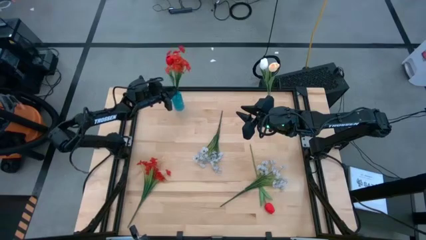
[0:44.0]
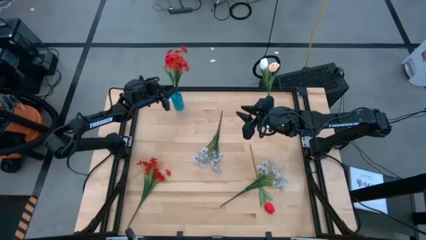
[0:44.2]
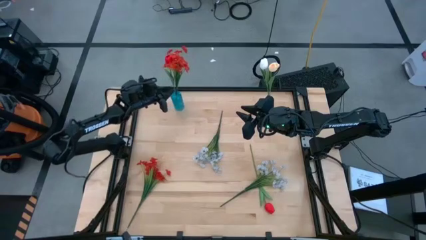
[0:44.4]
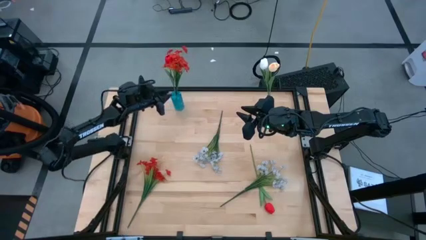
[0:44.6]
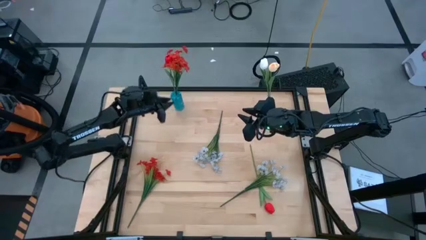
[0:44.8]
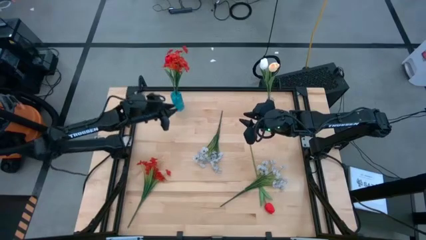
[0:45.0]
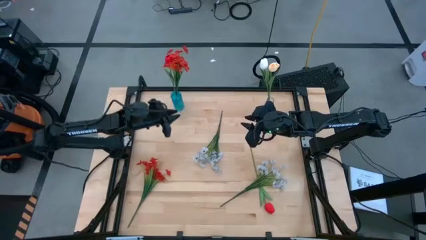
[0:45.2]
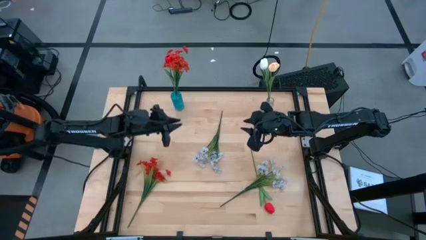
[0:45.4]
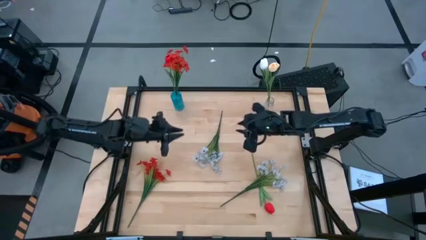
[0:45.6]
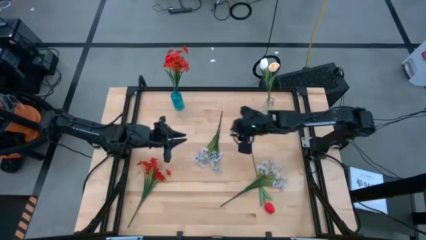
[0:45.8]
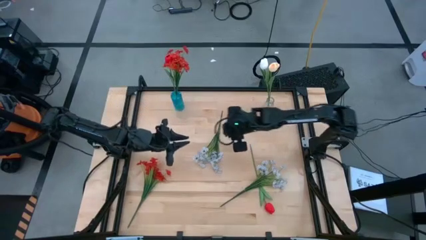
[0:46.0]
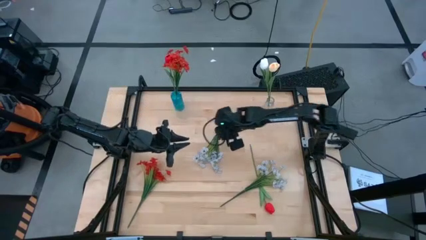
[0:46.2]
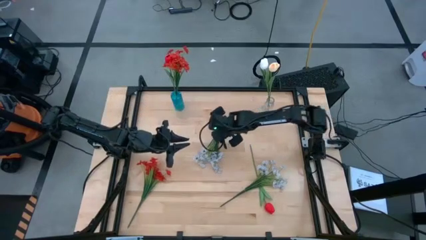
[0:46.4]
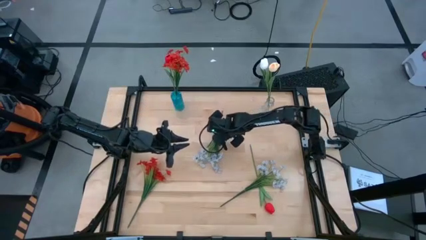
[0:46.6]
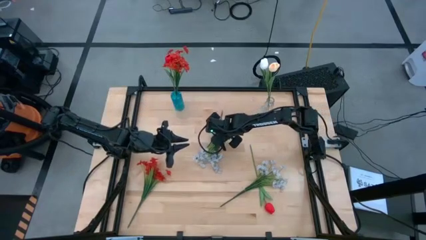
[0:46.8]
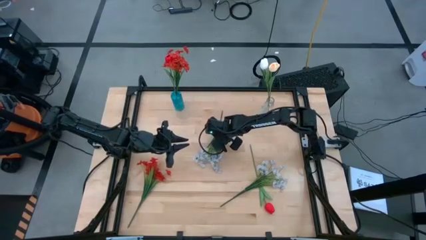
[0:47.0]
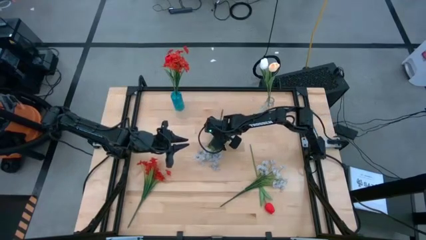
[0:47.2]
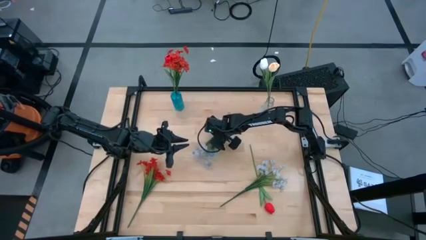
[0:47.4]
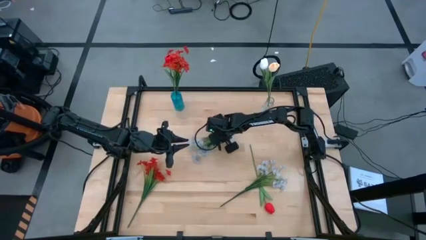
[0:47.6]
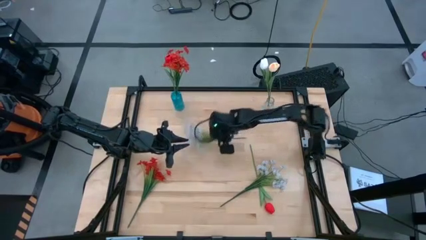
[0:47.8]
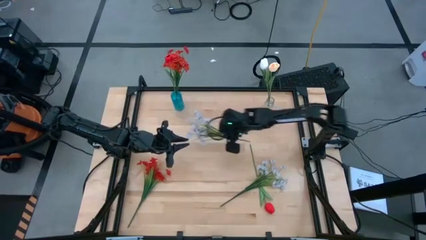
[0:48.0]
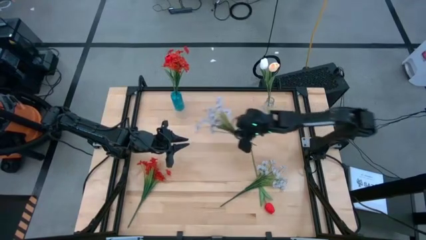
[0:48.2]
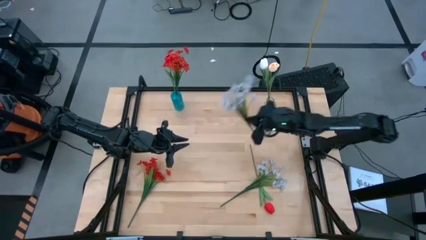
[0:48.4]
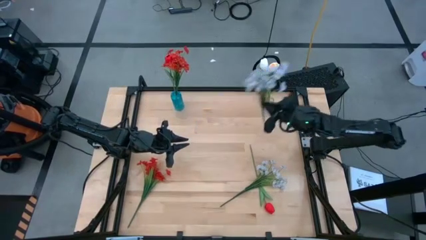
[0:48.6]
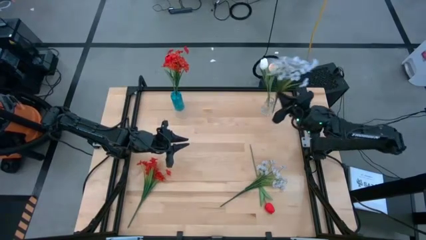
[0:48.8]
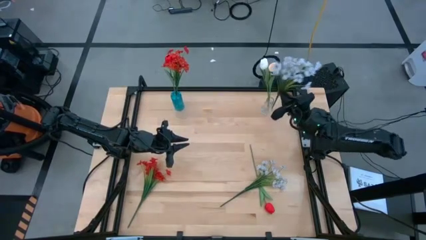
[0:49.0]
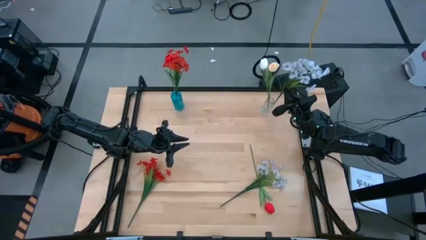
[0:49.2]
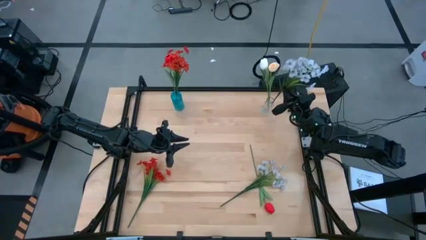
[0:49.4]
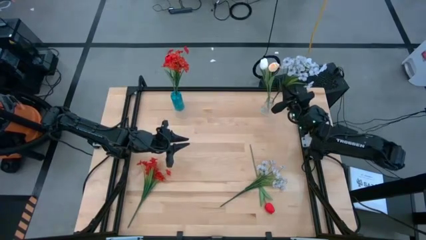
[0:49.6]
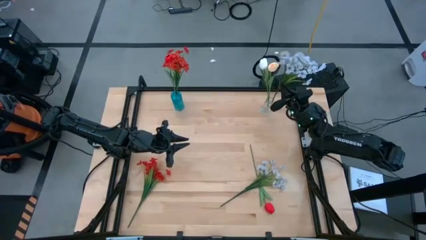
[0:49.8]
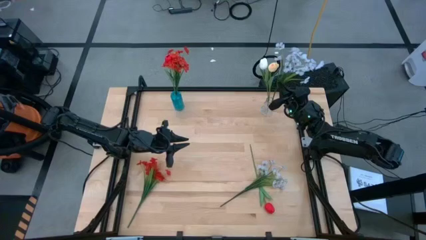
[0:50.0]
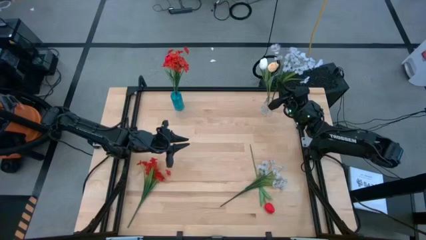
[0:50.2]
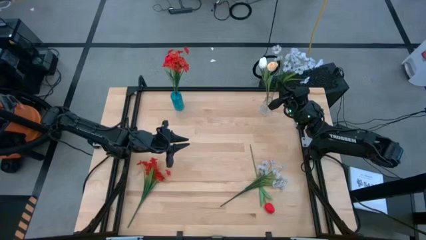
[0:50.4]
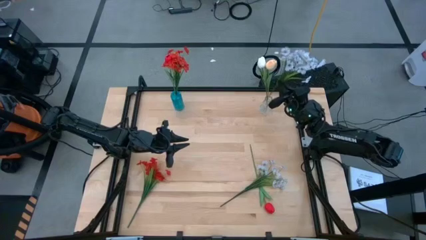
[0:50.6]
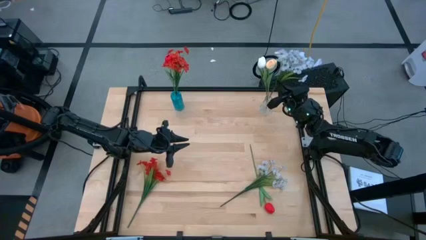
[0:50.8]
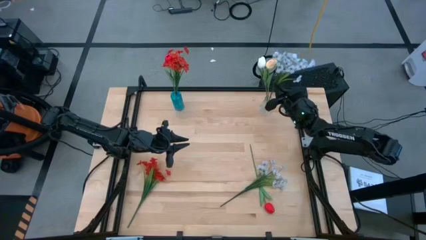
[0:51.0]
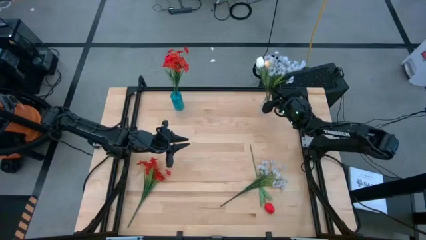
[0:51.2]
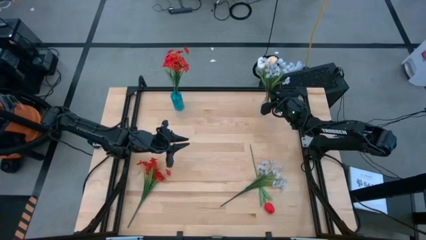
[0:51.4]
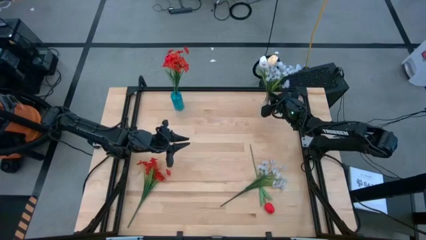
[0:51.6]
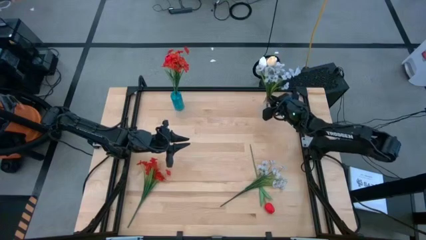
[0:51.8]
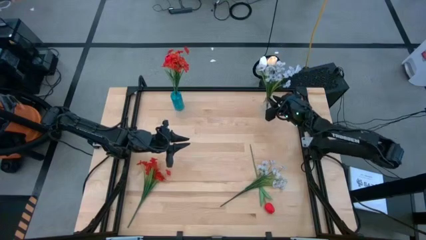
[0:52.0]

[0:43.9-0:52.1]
Task: Sort flowers into vase by color
Put the top white flowers into the transparent vase

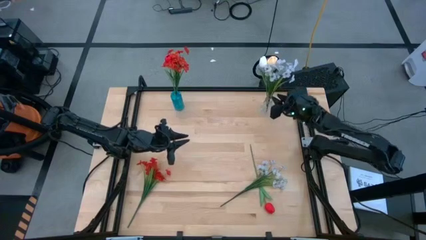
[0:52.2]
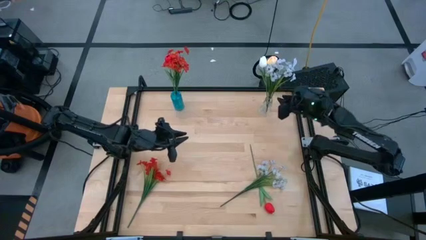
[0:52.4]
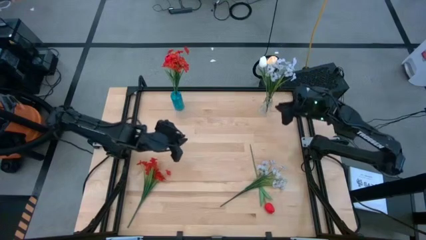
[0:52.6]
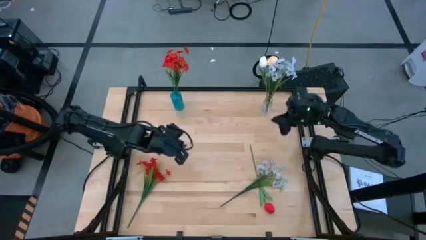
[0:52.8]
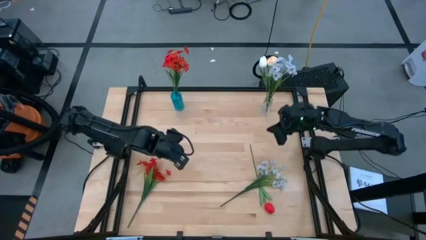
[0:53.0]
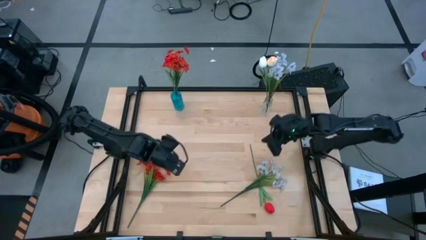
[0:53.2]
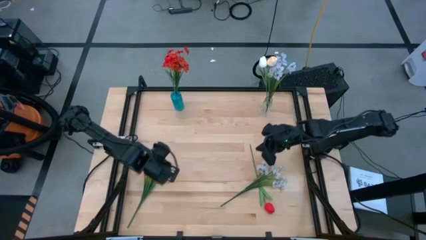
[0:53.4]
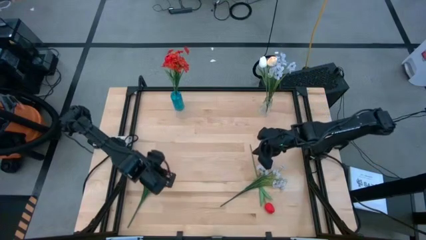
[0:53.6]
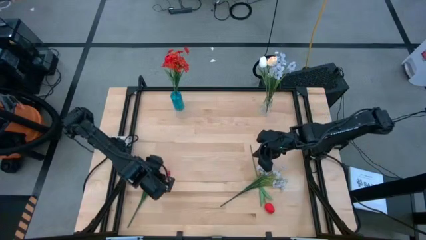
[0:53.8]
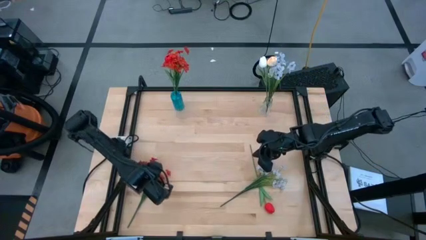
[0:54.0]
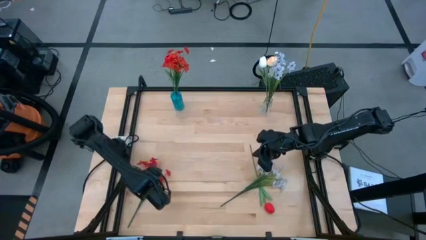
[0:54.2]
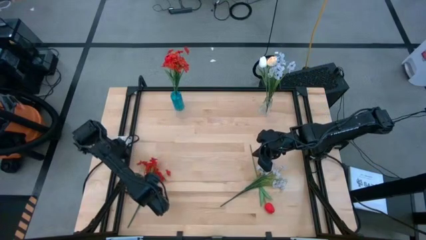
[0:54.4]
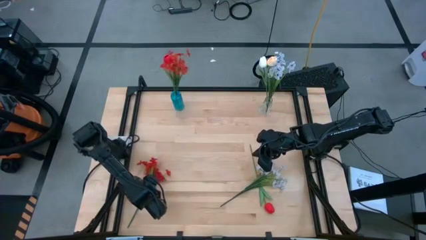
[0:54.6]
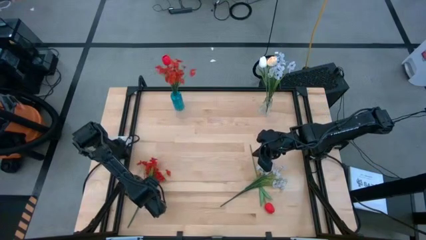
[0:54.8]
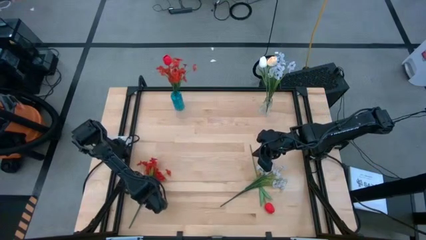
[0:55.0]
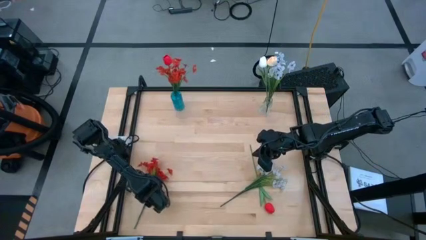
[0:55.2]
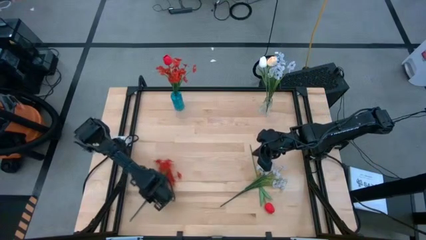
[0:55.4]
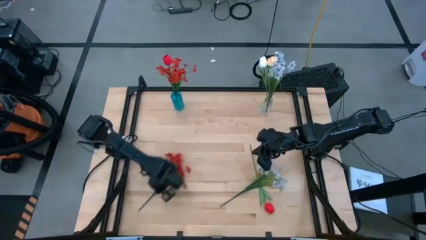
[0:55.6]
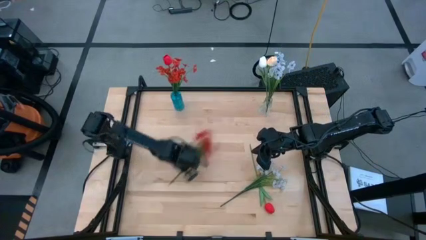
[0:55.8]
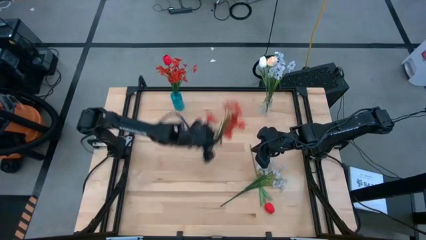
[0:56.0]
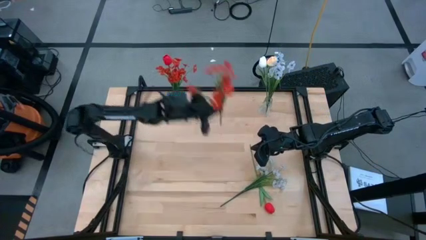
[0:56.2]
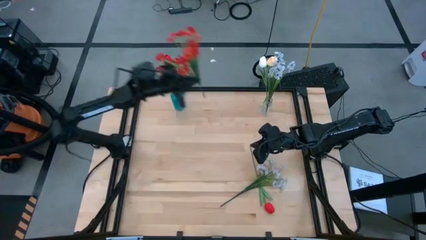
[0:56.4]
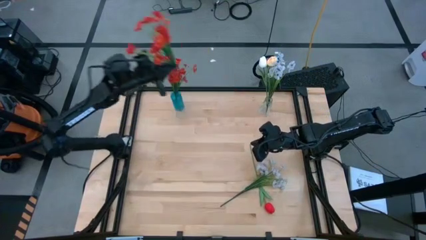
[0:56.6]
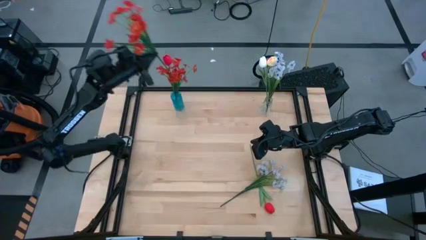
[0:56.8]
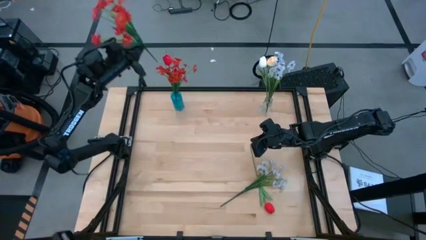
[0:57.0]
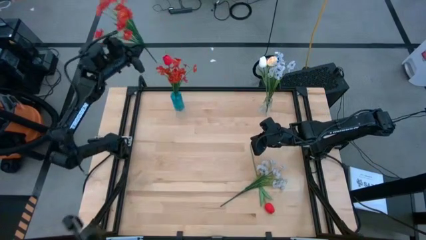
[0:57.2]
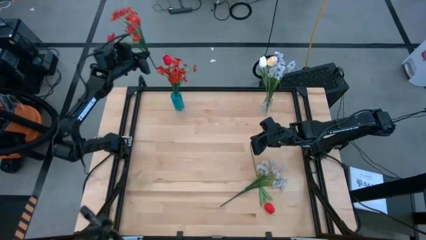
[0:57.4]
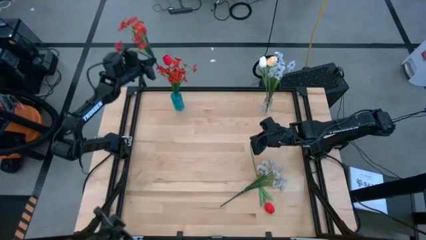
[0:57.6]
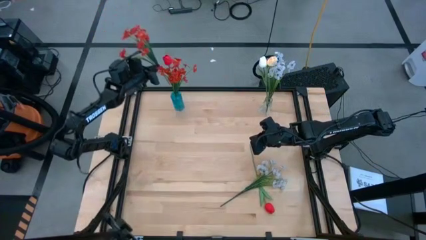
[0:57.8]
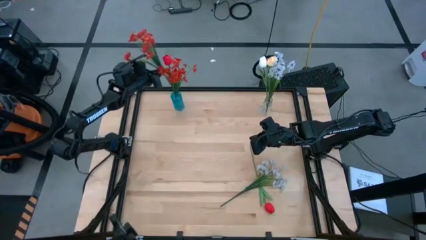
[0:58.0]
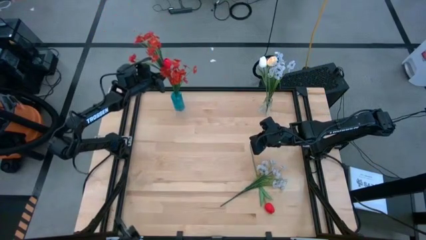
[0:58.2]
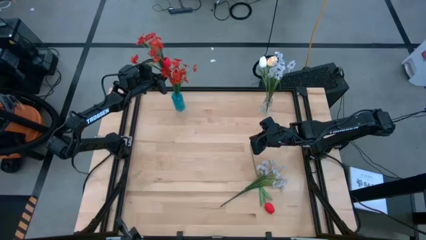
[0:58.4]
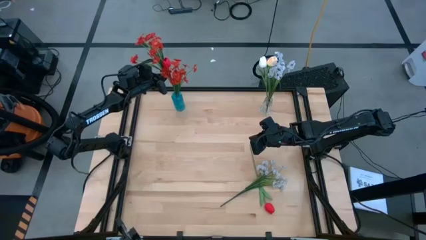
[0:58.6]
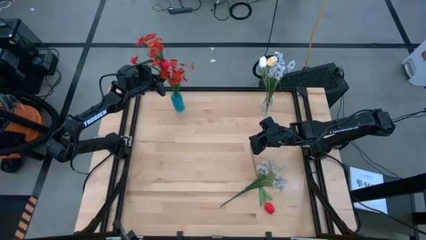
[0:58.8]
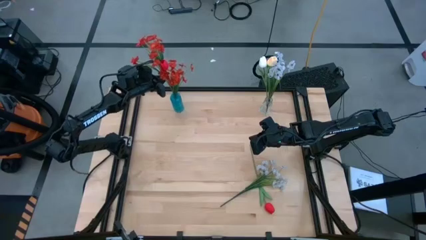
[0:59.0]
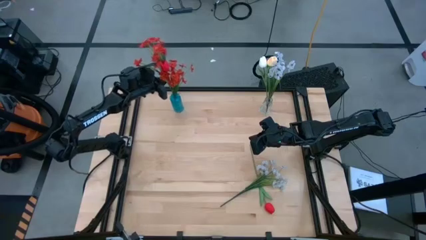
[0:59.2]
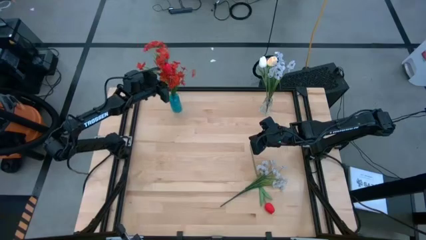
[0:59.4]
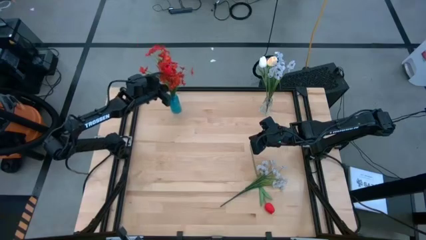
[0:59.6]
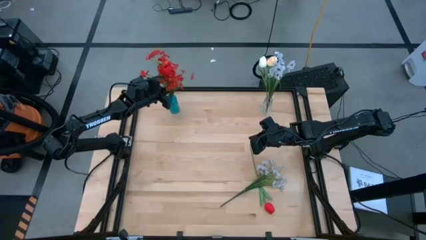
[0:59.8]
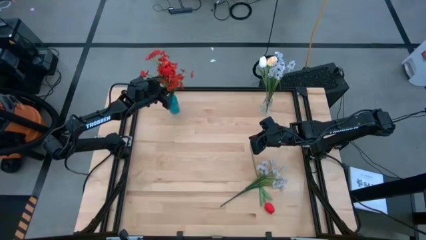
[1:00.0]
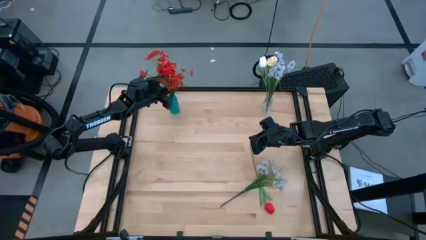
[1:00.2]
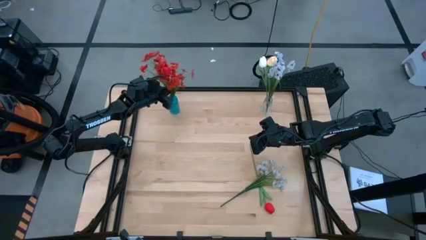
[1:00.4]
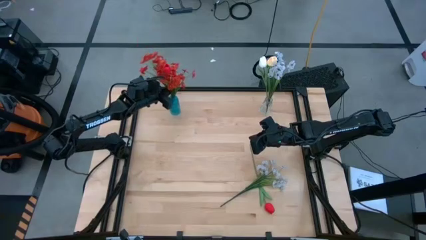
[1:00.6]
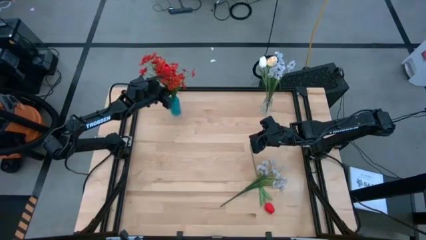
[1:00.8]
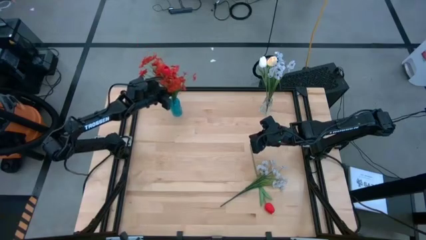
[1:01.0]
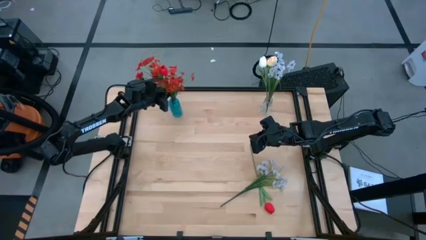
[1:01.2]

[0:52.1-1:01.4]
Put the orange flowers into the blue vase
